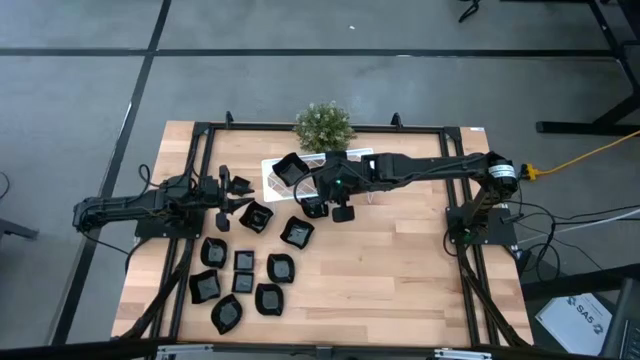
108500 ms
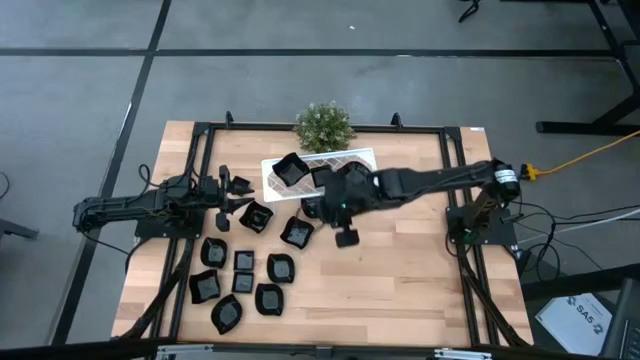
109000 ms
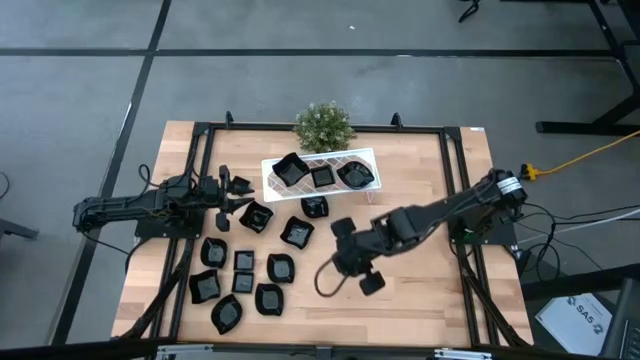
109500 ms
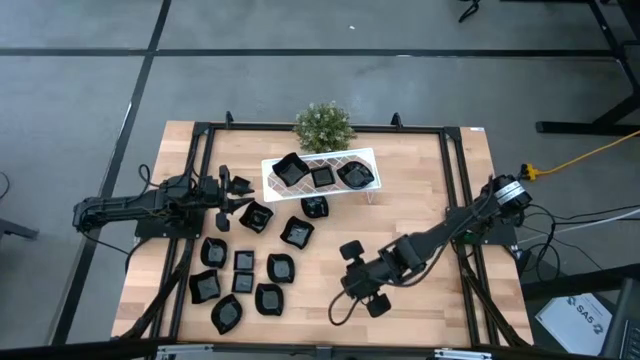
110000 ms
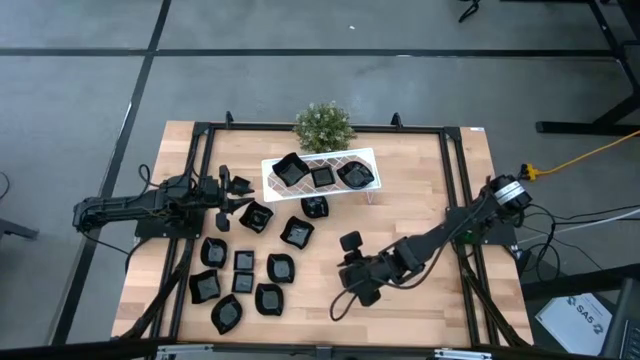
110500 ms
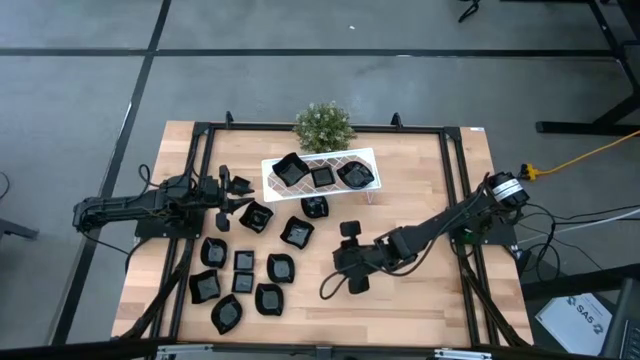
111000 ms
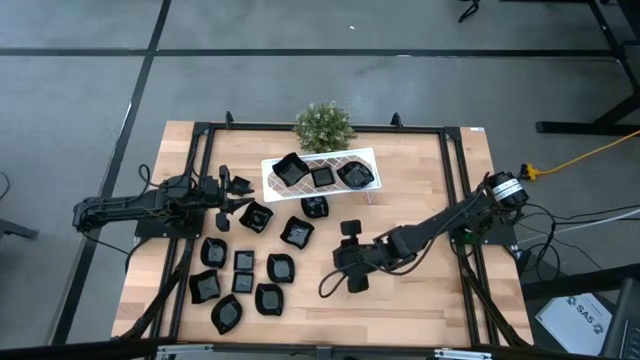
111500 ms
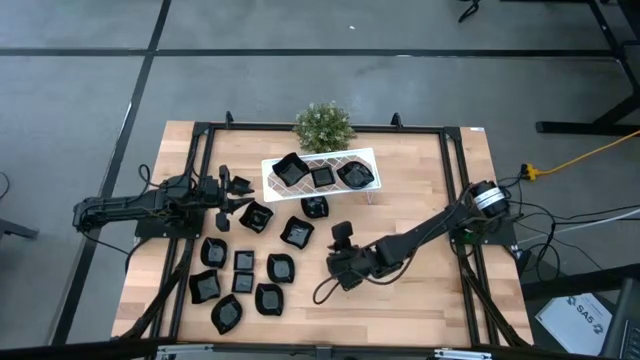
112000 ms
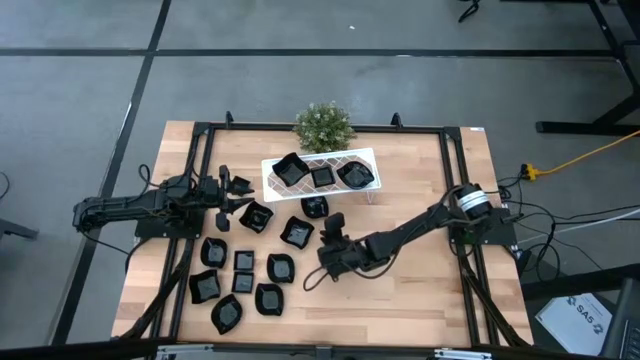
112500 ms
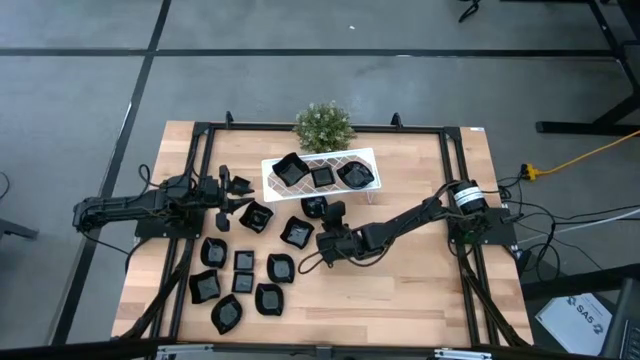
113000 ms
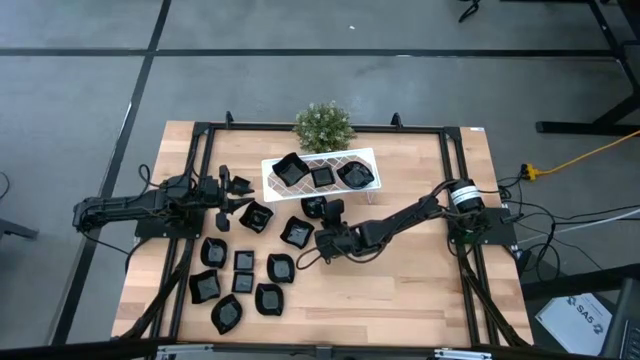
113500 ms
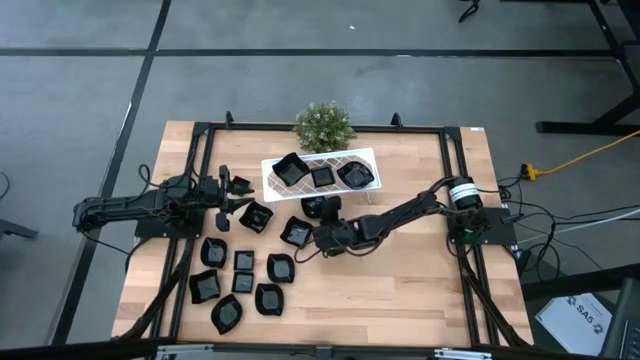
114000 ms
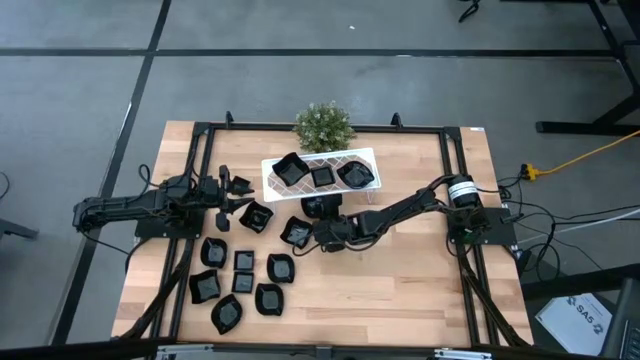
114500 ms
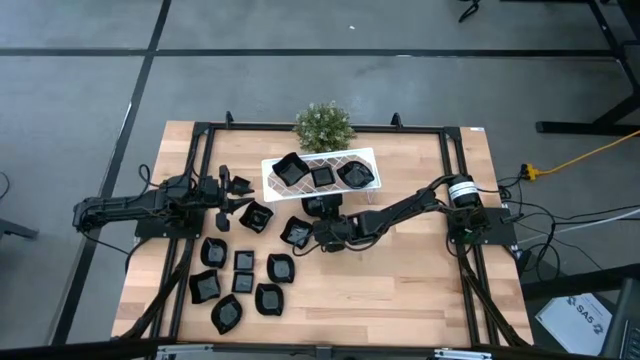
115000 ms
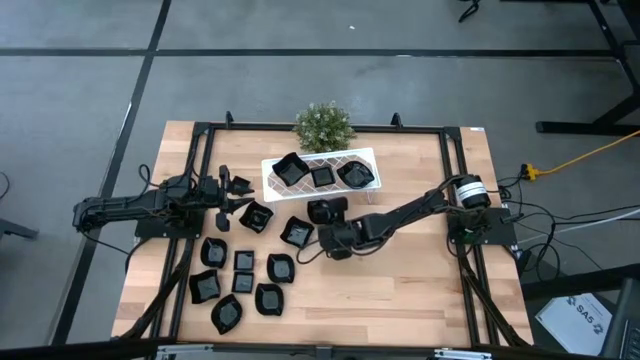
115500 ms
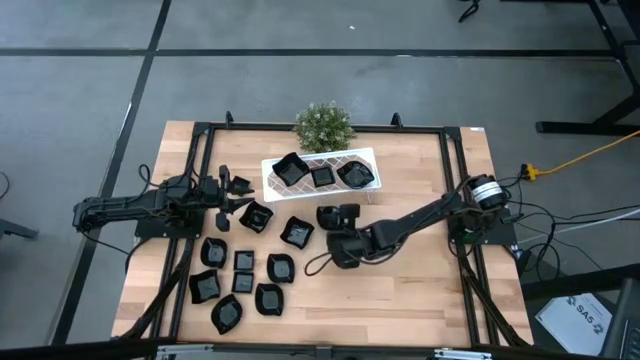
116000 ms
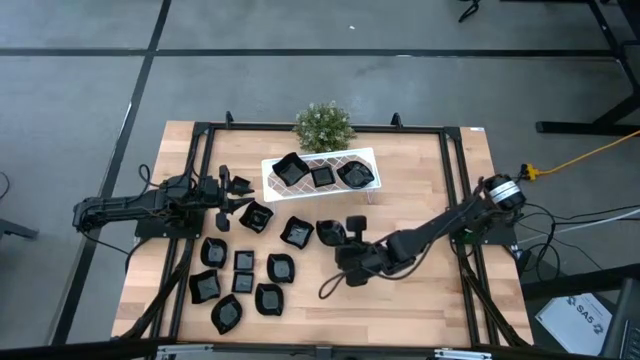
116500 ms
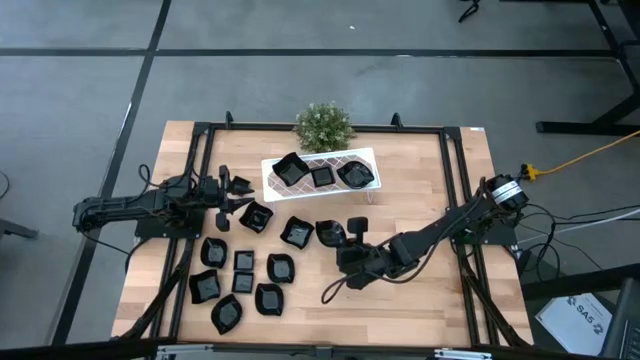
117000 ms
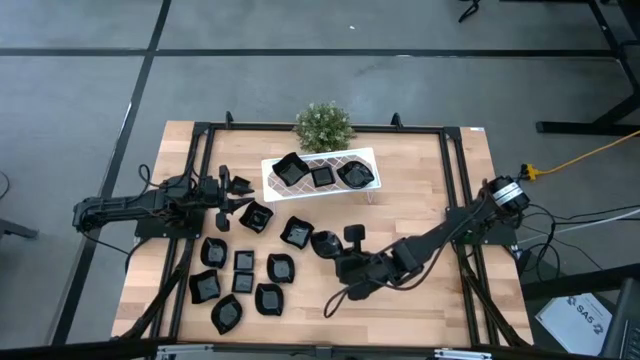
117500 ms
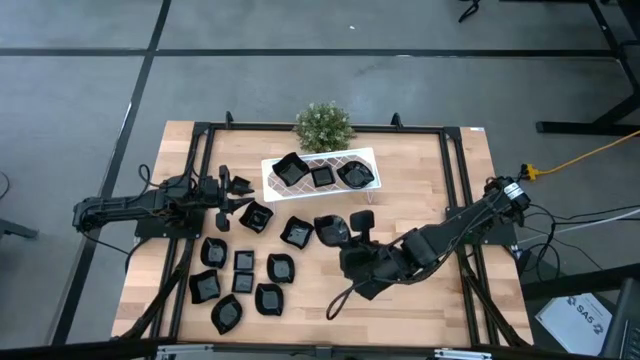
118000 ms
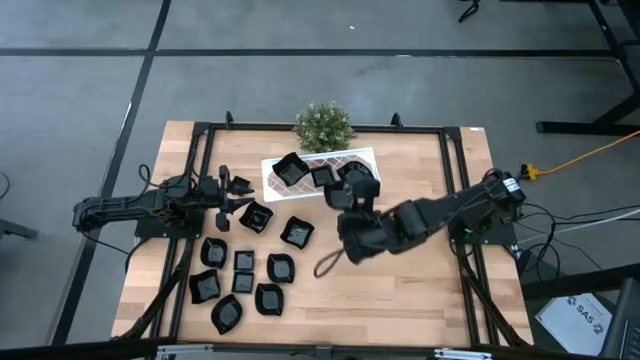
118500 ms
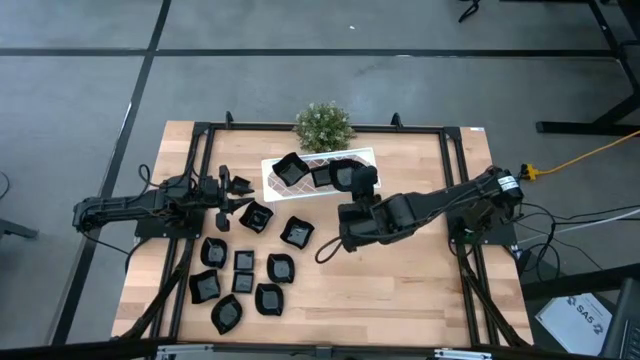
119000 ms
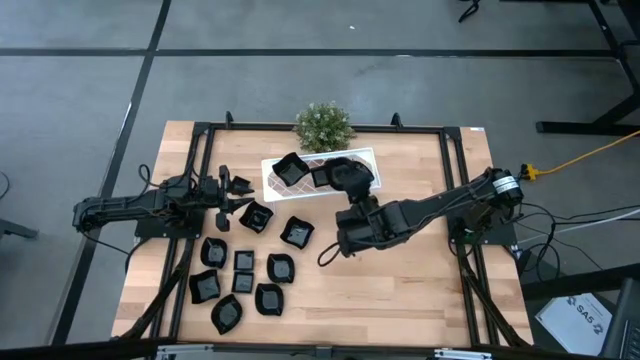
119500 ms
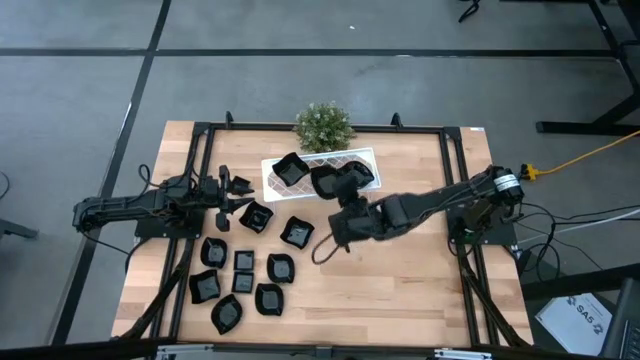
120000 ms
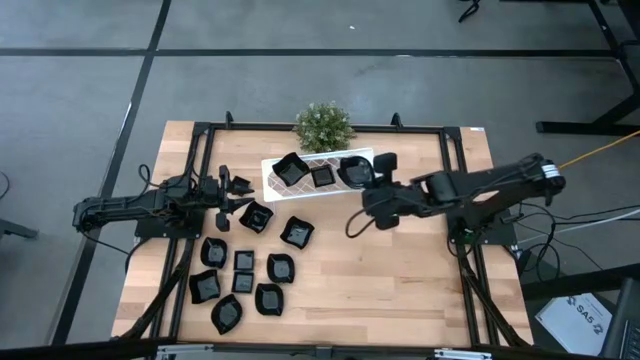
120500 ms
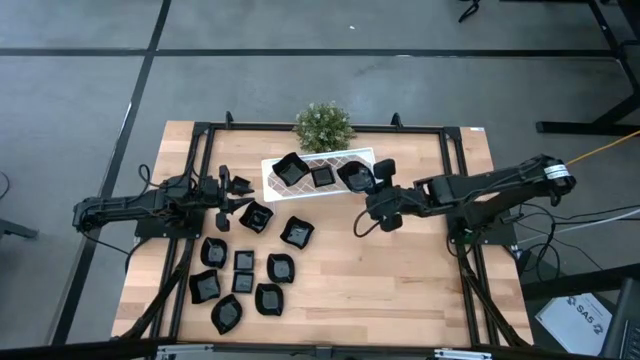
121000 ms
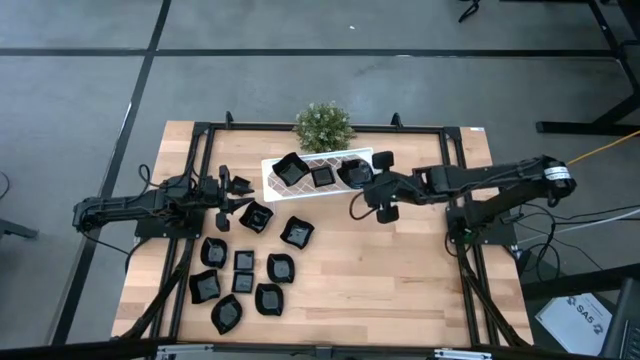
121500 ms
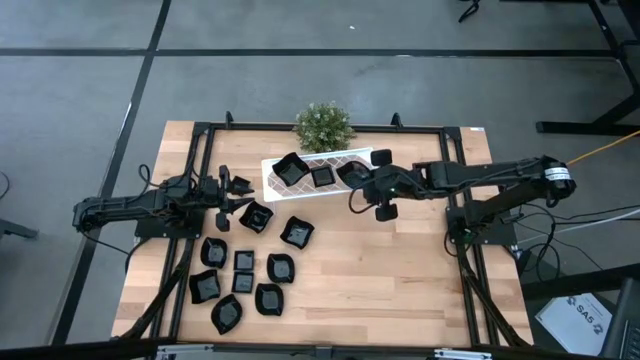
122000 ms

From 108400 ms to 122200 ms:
Task: Pick & Place Mini shaped plates
Stack the leaf shaped plate on top of the leaf shaped plate on the shelf

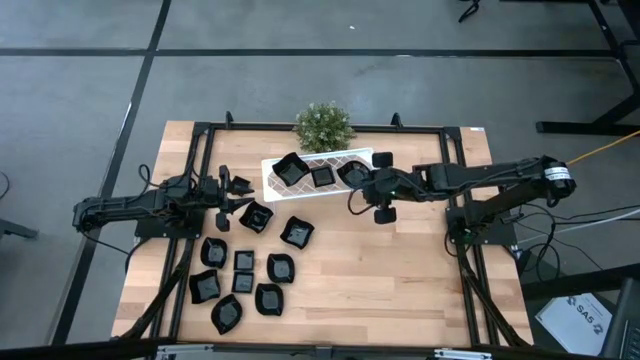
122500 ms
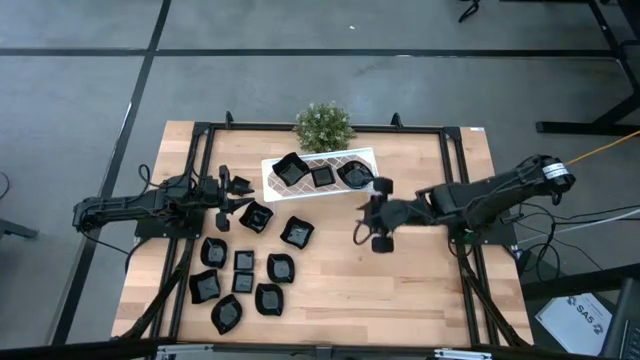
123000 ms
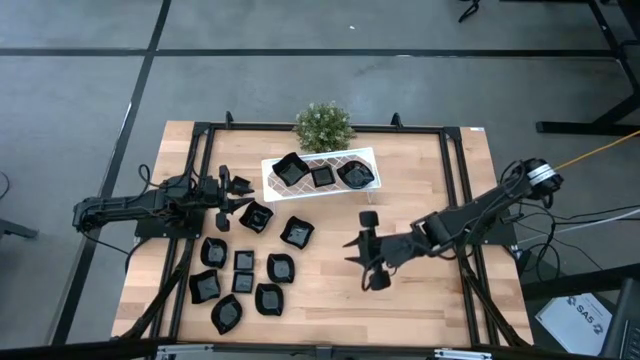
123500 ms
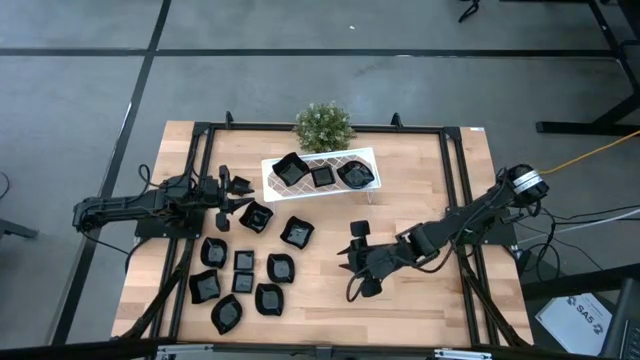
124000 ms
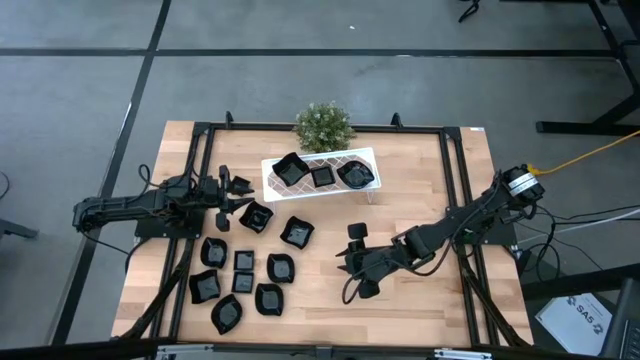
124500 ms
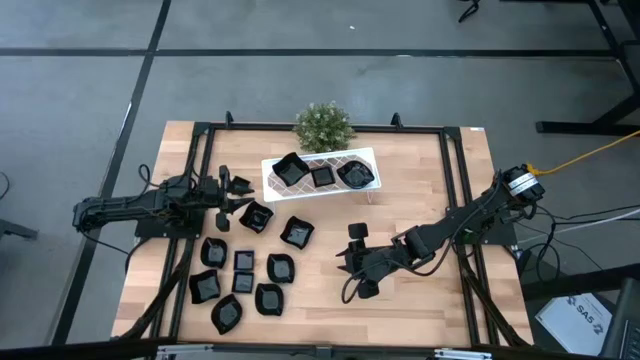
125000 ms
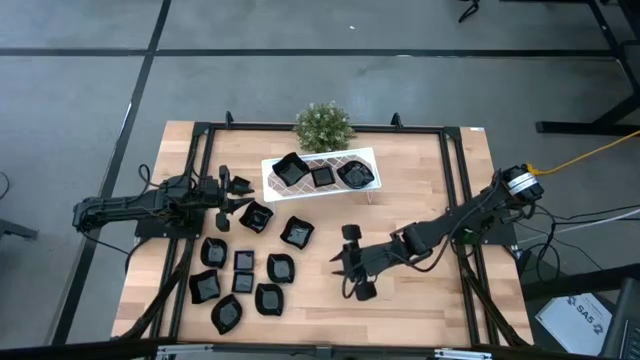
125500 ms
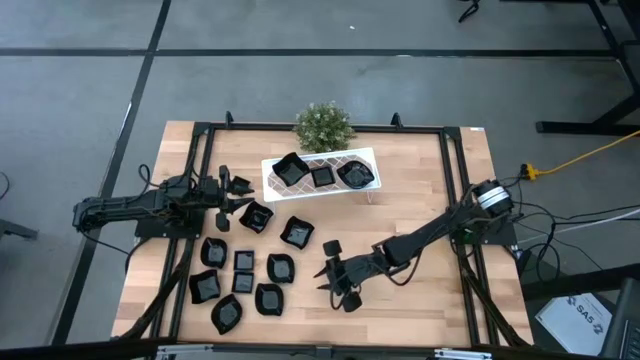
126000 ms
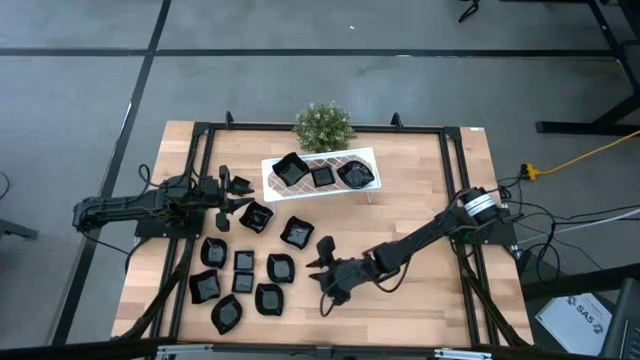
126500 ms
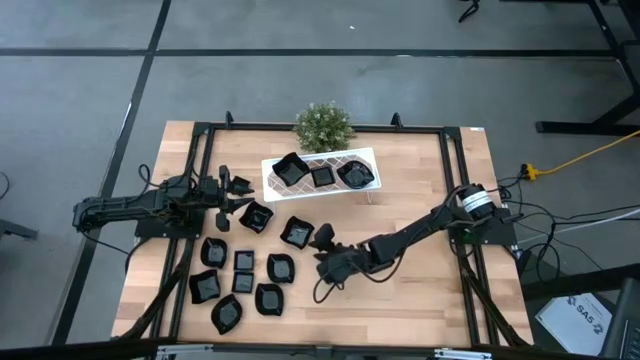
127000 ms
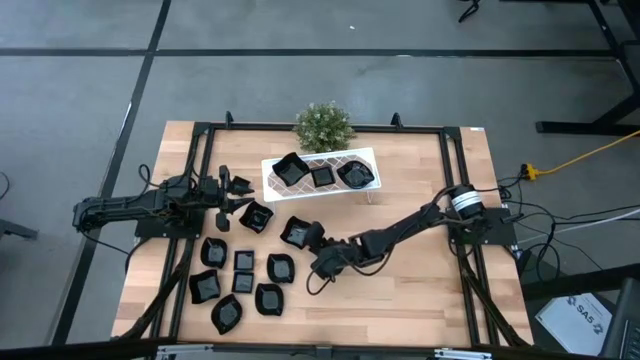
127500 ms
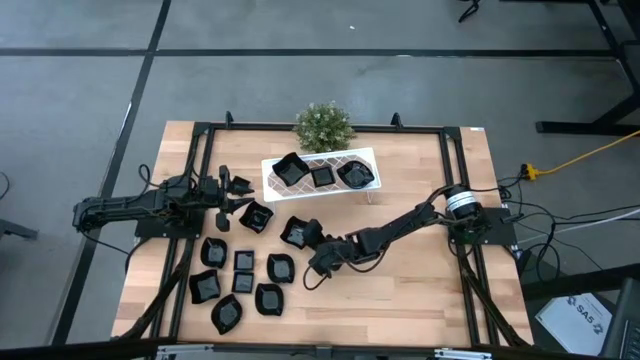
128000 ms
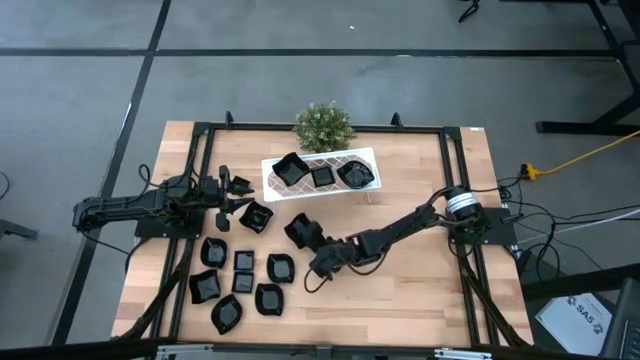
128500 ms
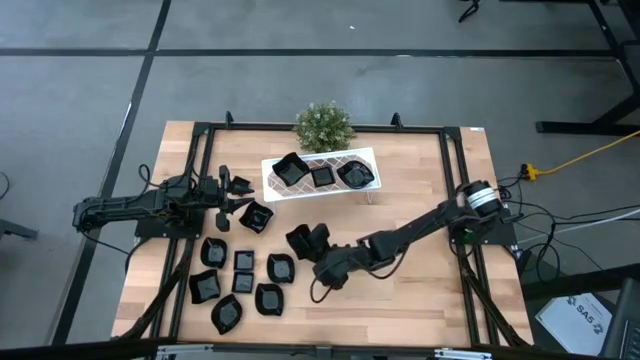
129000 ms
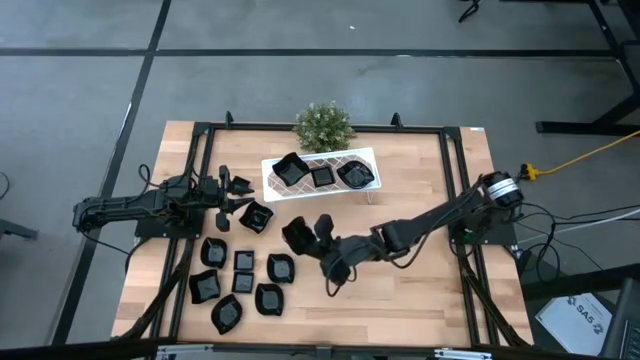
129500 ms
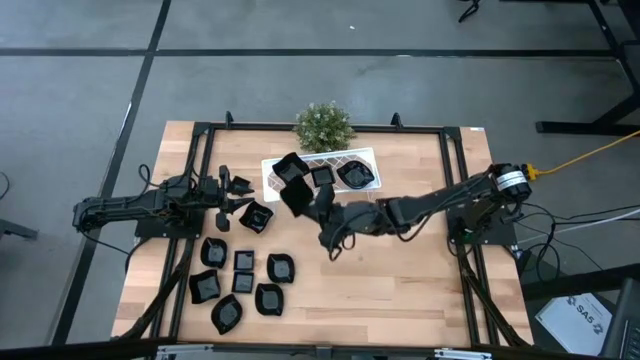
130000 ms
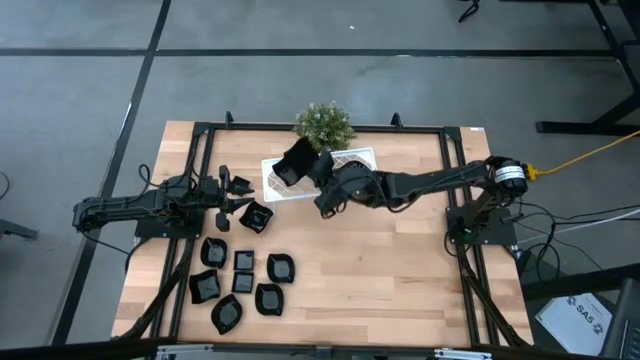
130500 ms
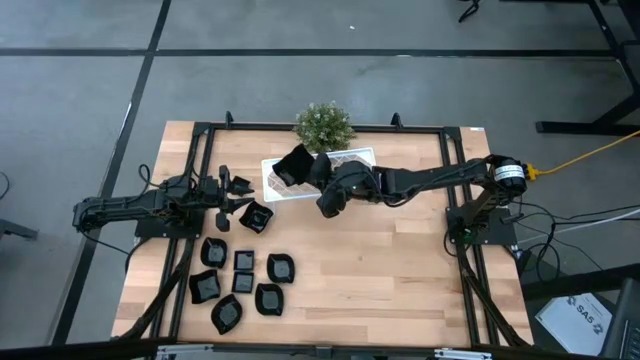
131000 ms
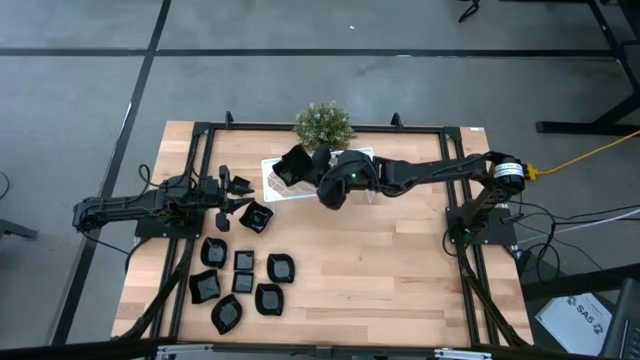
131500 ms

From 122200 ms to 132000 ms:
Stack the distorted square plate on top of the distorted square plate on the shelf
